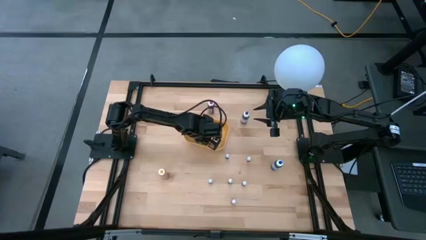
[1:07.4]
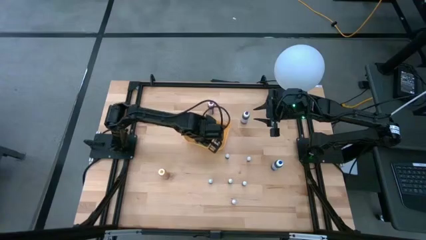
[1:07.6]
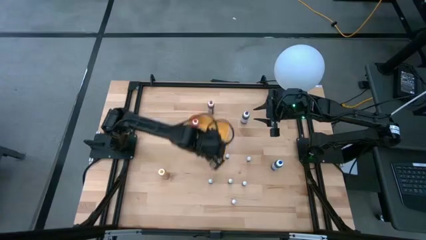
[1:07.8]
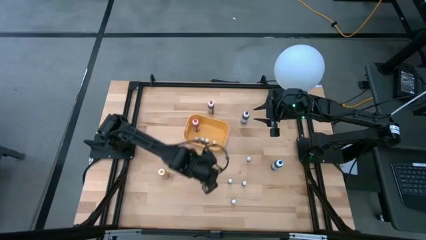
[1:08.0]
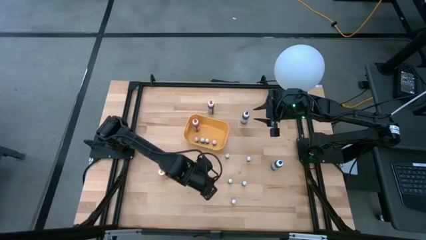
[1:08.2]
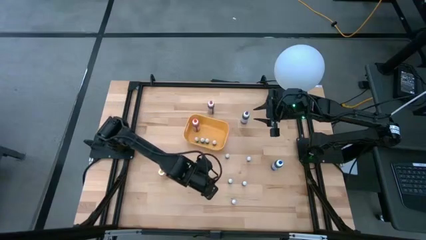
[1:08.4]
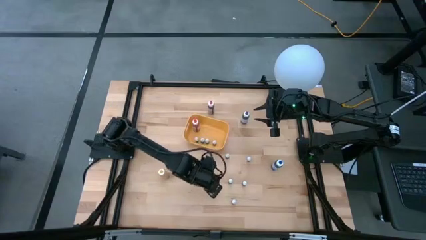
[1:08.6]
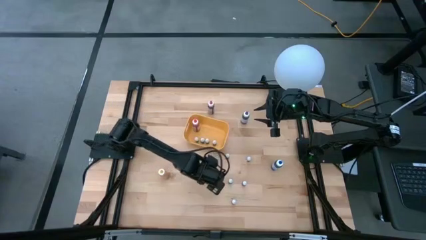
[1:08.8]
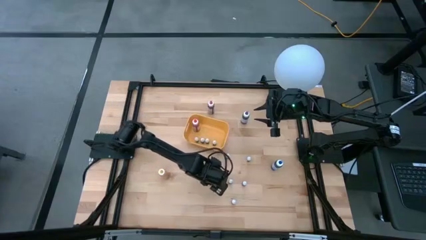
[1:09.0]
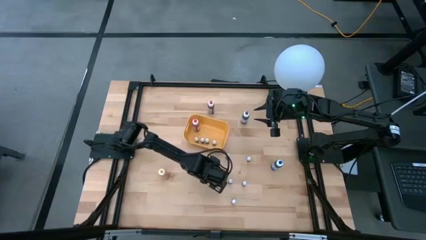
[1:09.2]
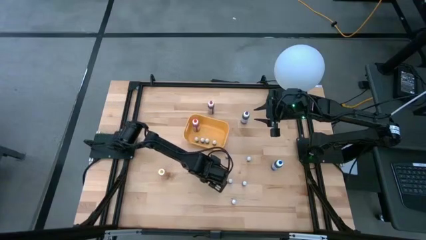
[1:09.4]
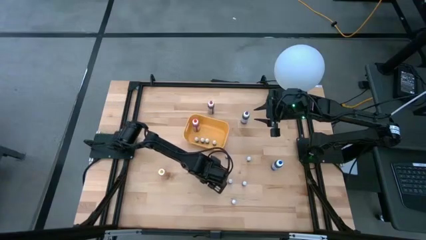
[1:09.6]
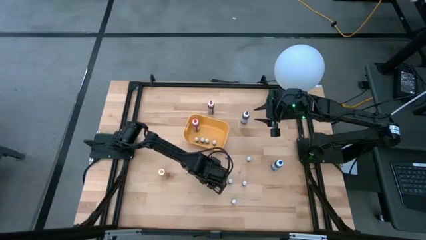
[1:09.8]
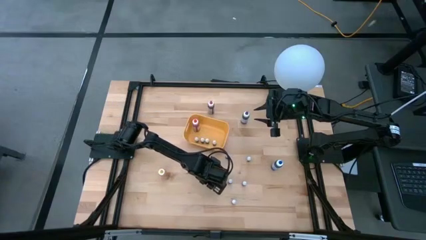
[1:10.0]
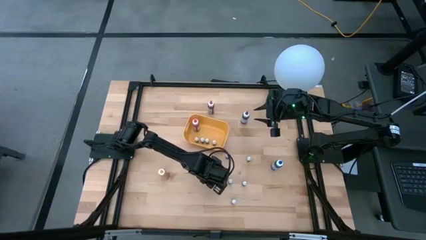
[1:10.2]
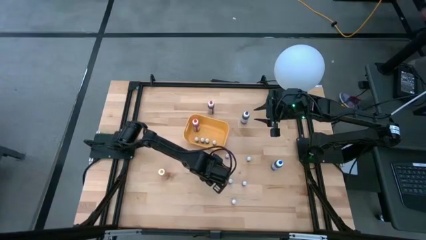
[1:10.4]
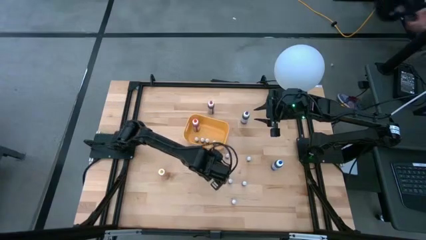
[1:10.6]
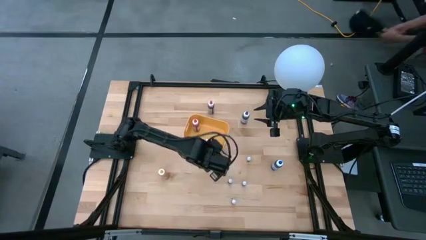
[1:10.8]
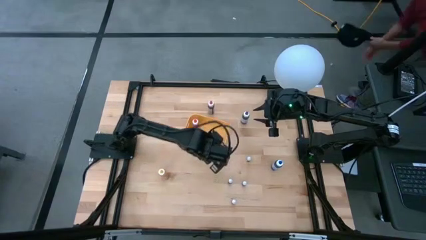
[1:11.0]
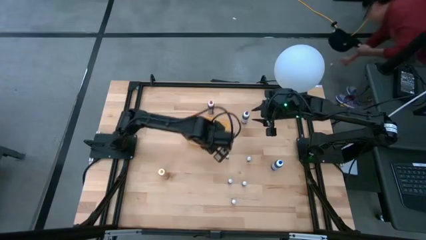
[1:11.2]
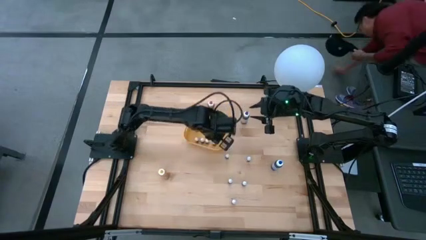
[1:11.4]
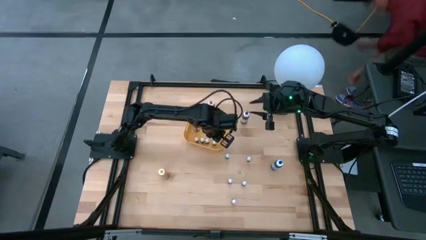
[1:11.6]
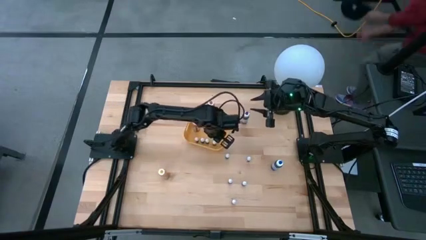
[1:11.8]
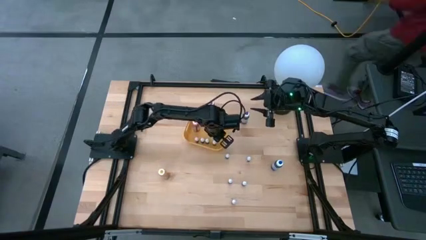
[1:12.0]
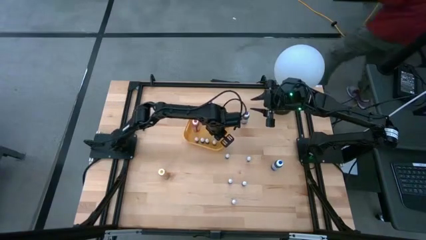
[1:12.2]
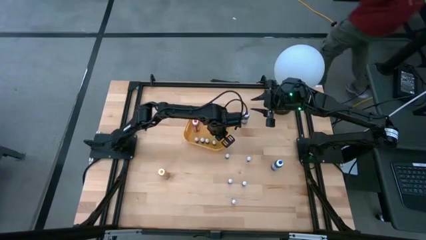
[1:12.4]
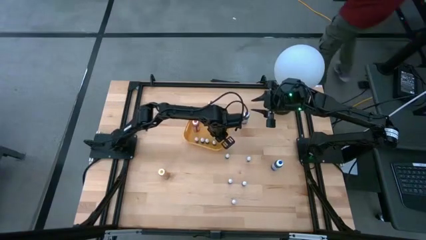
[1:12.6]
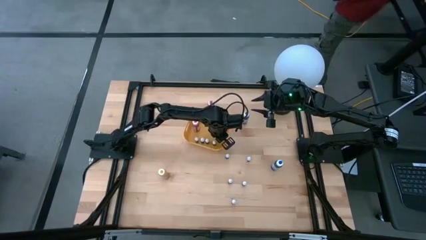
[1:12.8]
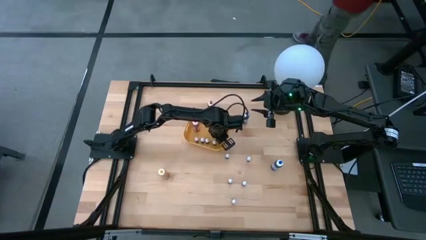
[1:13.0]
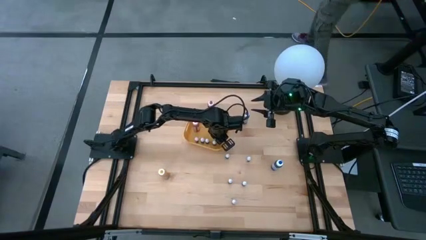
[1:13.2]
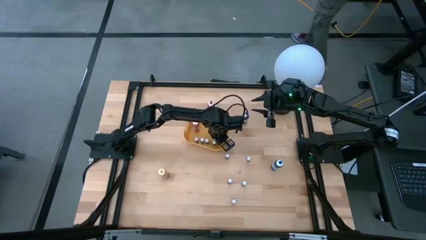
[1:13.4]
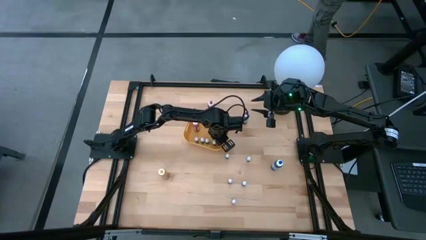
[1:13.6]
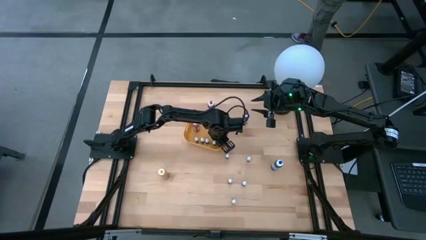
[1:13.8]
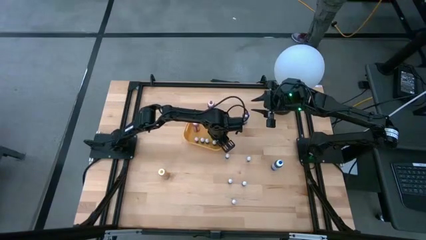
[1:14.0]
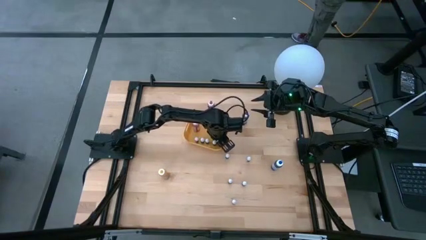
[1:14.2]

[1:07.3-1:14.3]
Task: Pick & Place food coloring
Put the left small blue food coloring bottle into the yellow bin

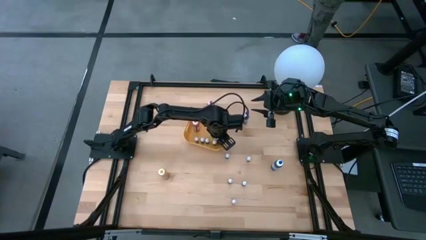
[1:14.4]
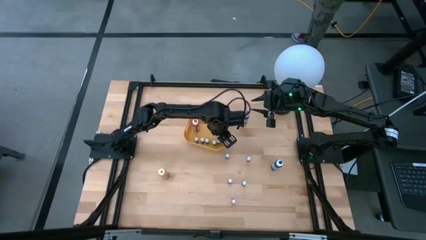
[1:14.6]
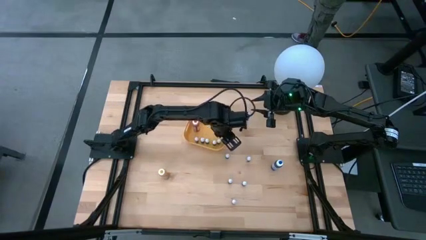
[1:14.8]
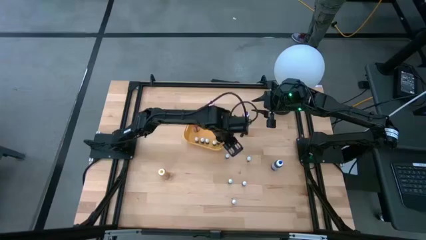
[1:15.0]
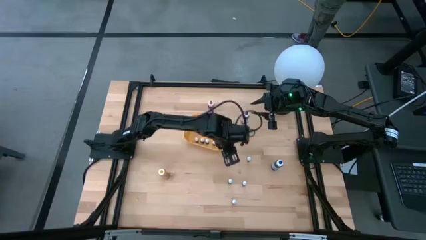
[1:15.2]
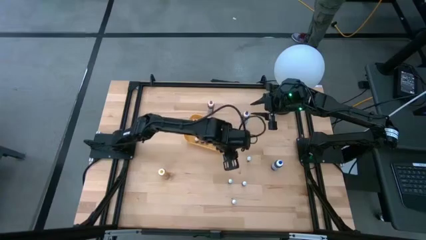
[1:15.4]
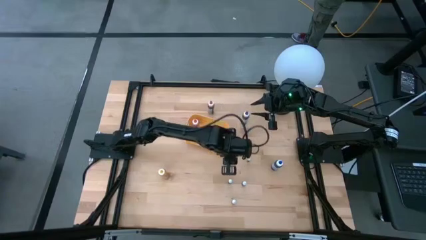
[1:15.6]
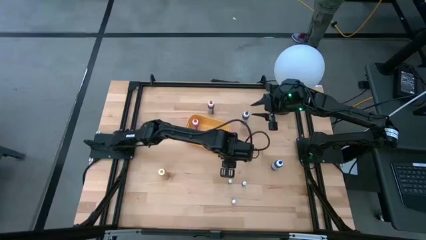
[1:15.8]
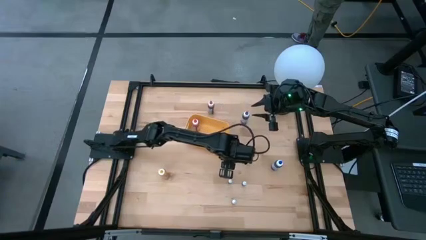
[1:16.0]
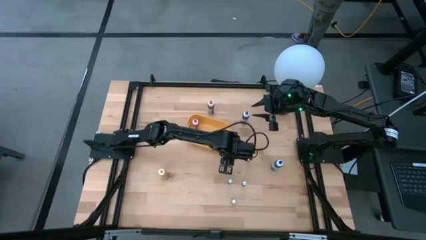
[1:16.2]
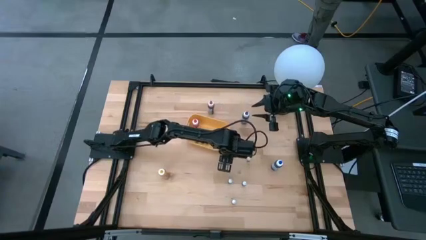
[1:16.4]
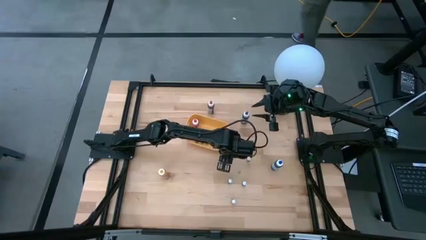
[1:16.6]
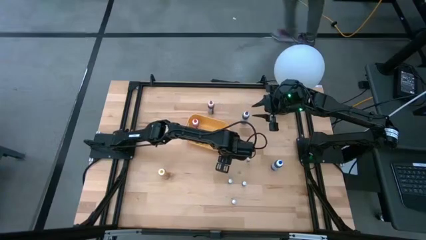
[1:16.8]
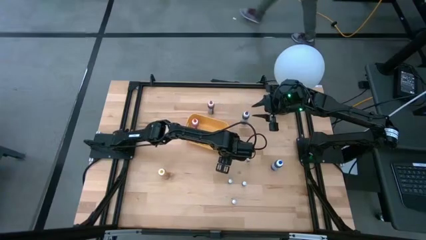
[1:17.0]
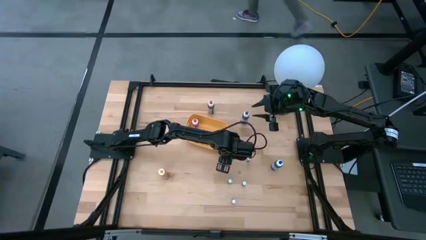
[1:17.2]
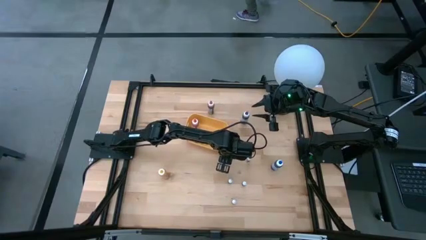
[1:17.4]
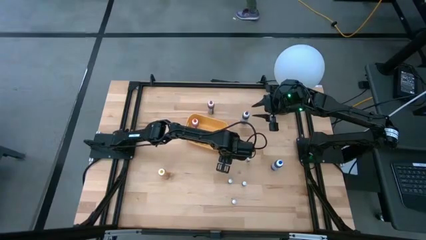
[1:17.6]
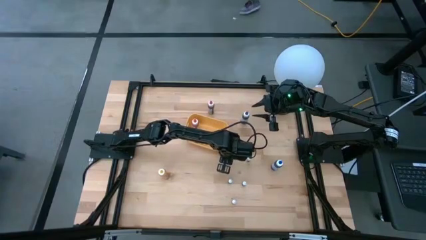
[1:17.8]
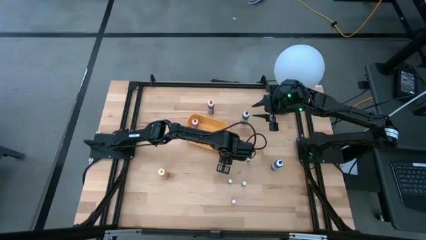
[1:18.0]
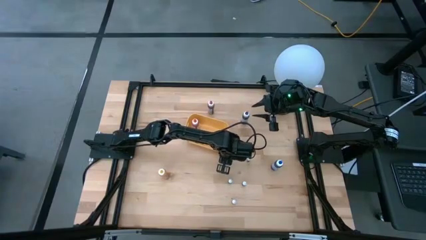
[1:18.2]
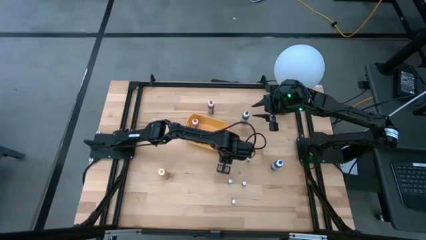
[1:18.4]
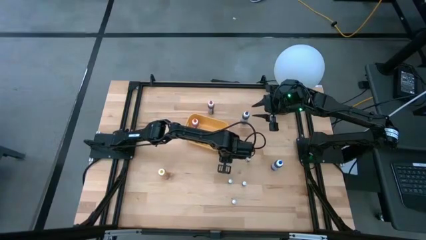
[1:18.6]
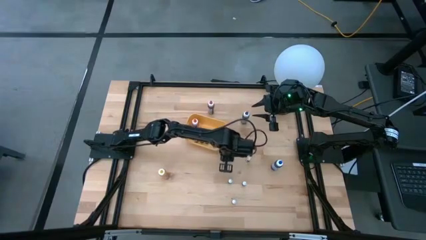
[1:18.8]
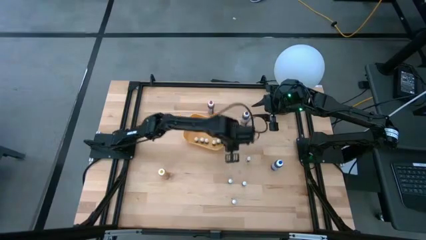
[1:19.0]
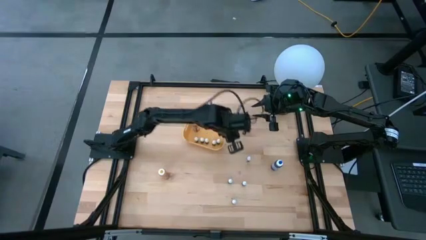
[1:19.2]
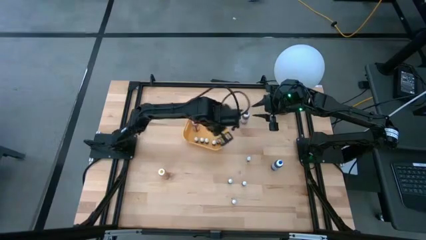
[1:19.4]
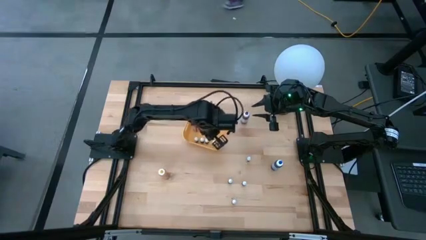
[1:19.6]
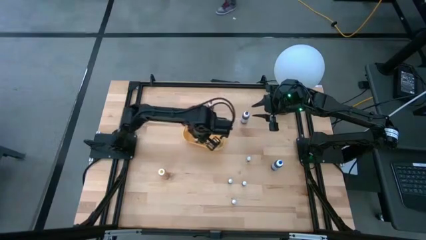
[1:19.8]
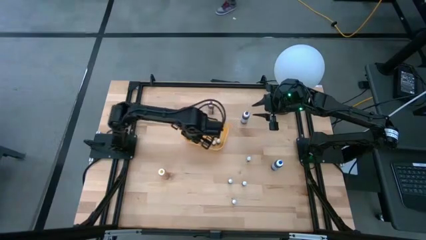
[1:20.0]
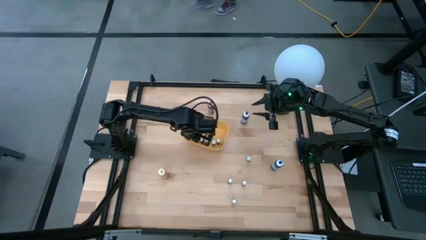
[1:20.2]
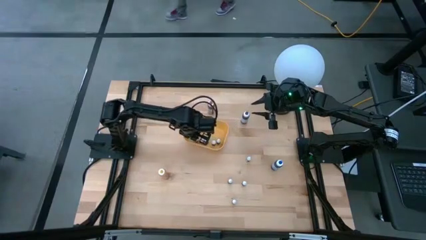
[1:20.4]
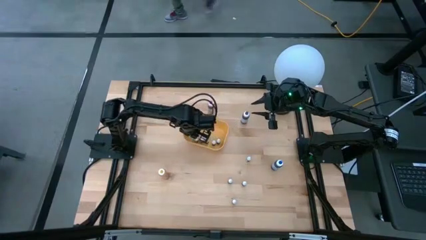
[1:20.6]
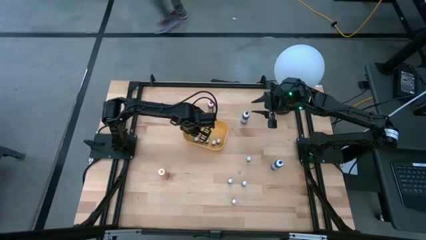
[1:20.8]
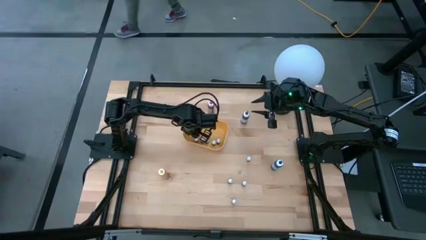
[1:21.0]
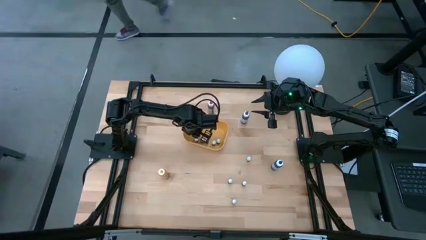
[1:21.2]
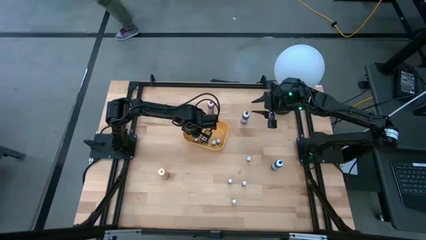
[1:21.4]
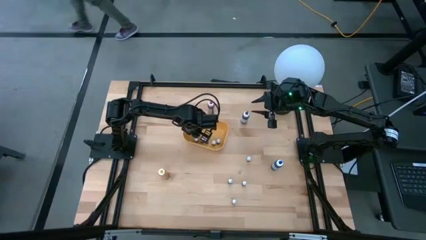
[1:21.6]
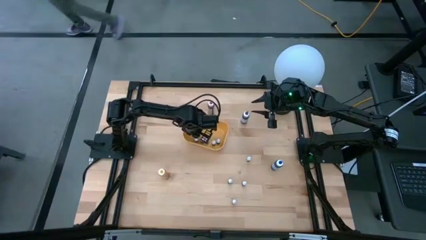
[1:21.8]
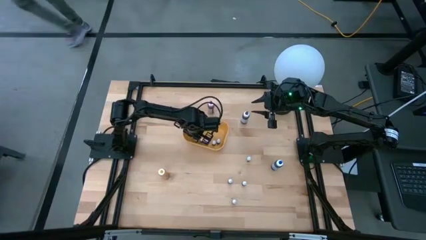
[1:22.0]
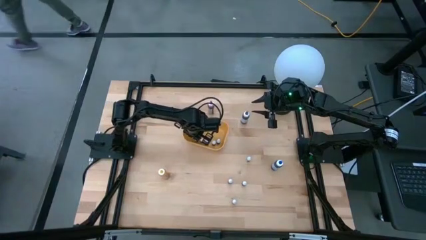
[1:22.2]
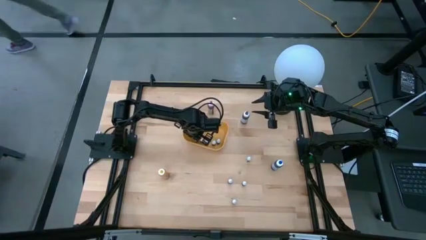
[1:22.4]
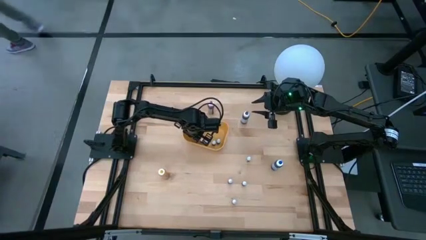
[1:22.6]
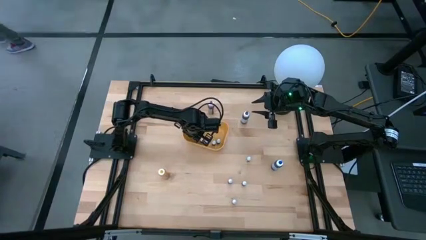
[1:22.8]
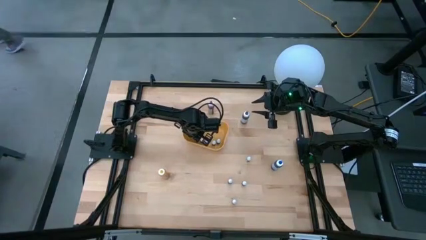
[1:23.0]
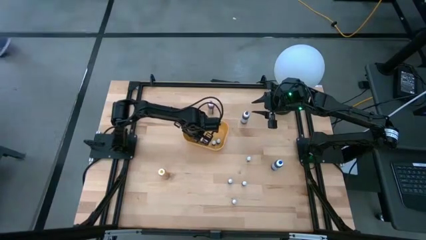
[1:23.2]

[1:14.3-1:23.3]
Put the small red food coloring bottle into the yellow bin
